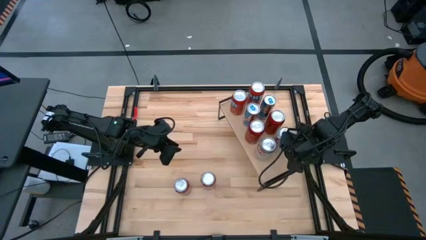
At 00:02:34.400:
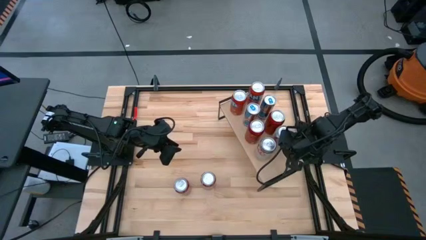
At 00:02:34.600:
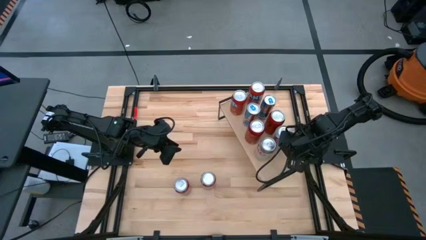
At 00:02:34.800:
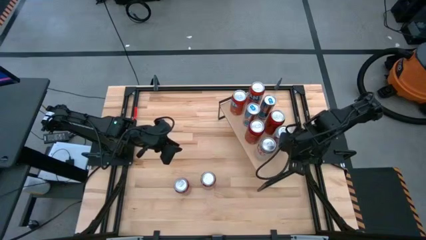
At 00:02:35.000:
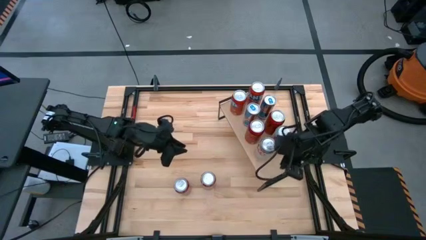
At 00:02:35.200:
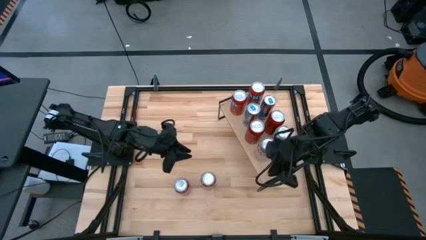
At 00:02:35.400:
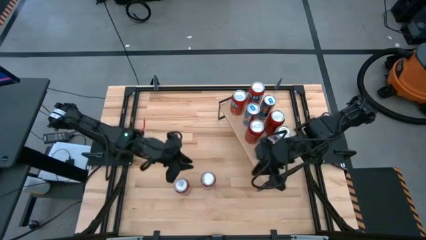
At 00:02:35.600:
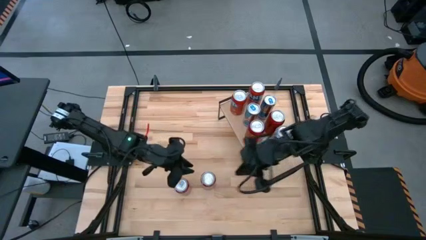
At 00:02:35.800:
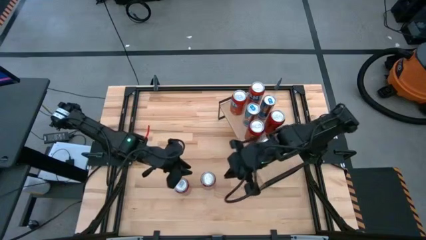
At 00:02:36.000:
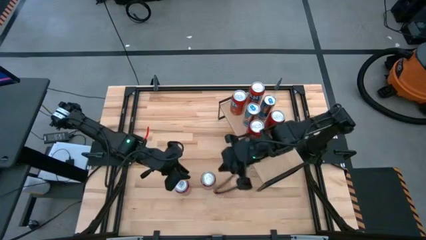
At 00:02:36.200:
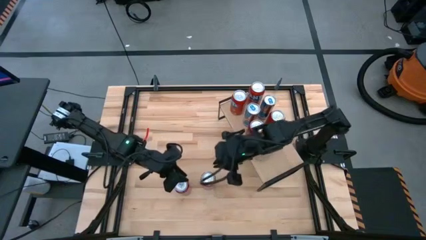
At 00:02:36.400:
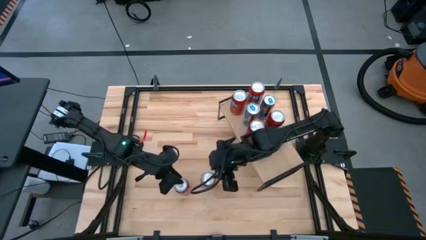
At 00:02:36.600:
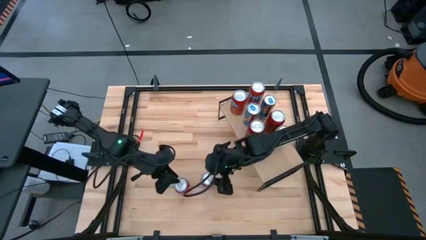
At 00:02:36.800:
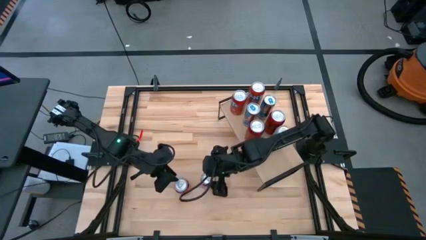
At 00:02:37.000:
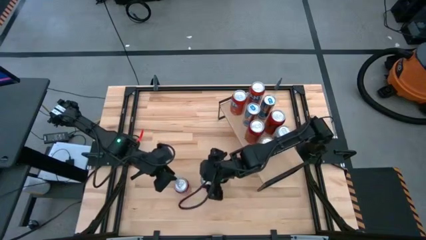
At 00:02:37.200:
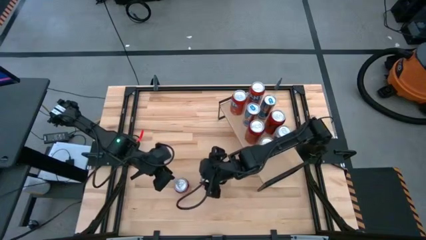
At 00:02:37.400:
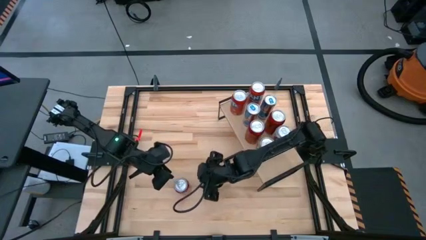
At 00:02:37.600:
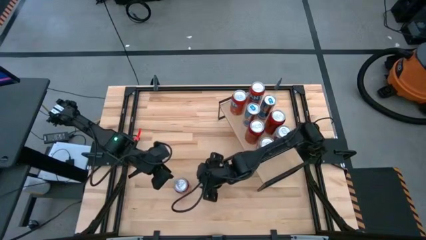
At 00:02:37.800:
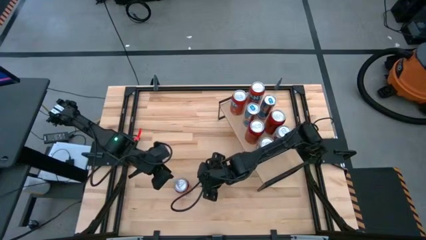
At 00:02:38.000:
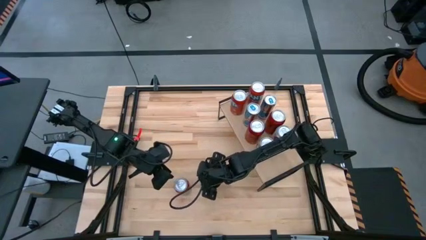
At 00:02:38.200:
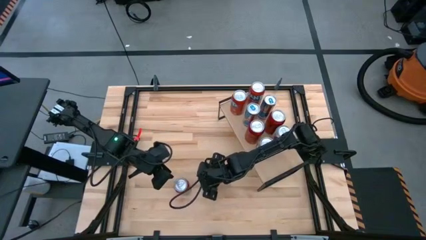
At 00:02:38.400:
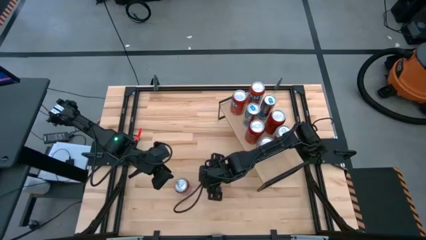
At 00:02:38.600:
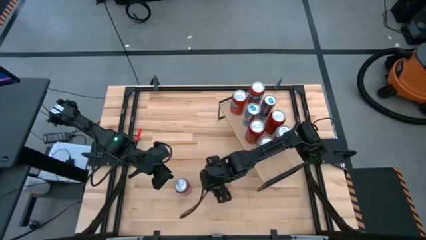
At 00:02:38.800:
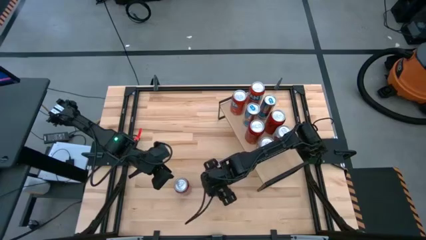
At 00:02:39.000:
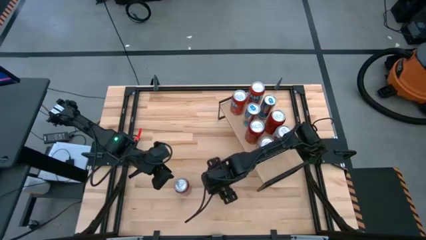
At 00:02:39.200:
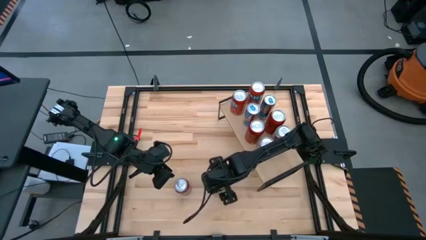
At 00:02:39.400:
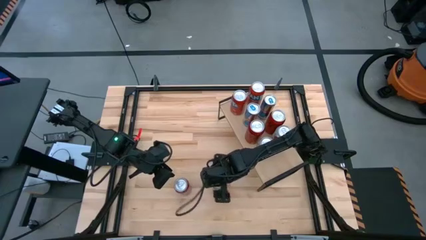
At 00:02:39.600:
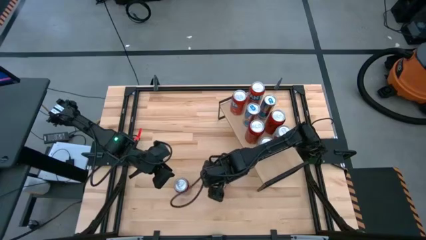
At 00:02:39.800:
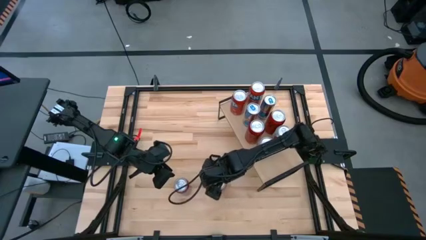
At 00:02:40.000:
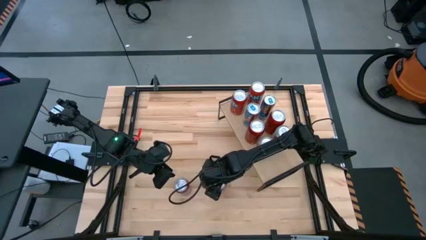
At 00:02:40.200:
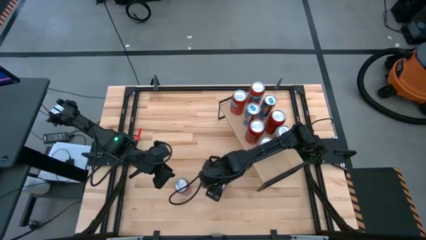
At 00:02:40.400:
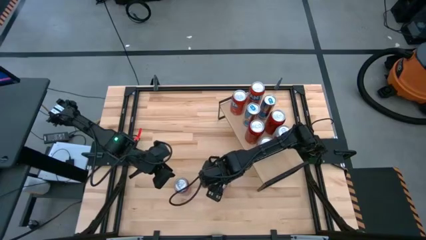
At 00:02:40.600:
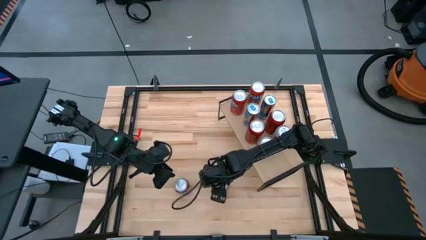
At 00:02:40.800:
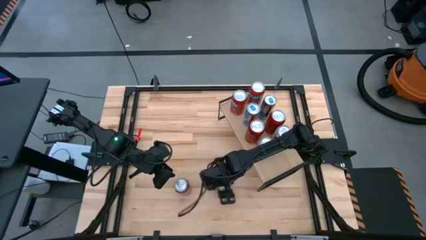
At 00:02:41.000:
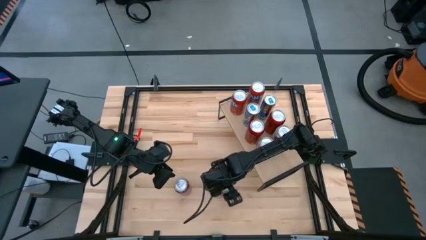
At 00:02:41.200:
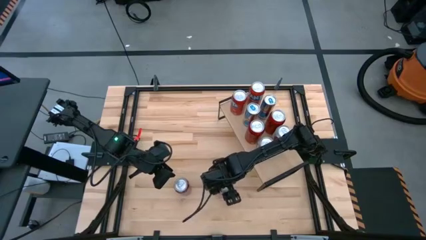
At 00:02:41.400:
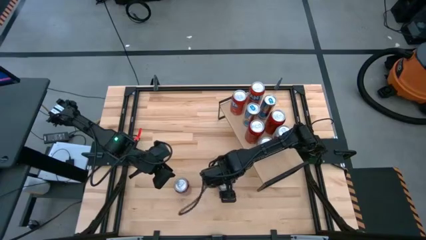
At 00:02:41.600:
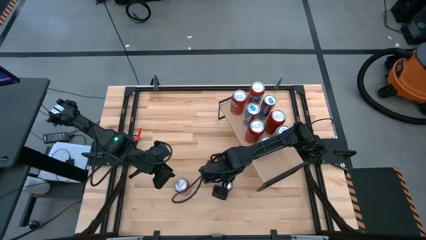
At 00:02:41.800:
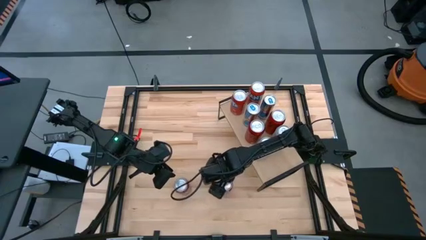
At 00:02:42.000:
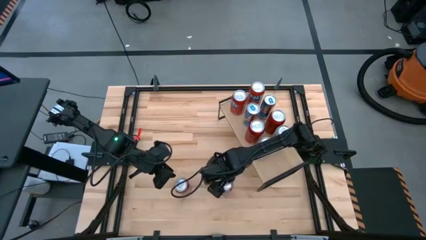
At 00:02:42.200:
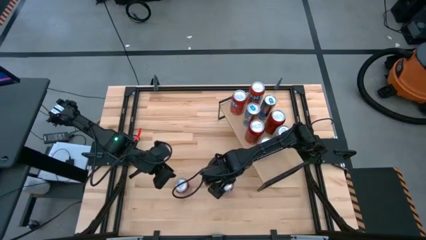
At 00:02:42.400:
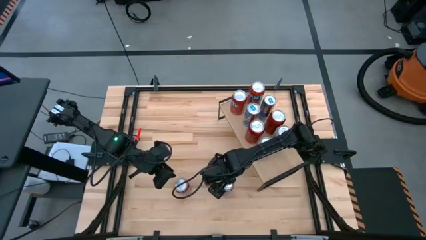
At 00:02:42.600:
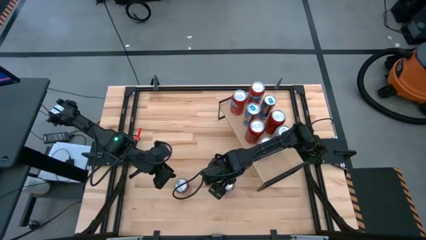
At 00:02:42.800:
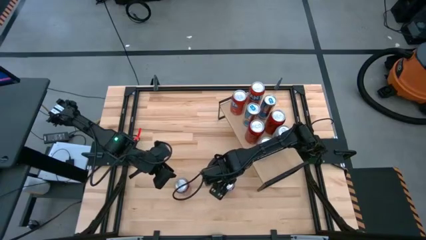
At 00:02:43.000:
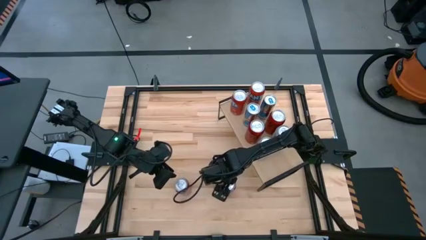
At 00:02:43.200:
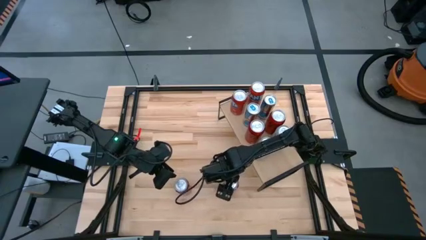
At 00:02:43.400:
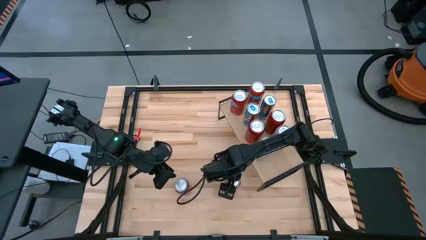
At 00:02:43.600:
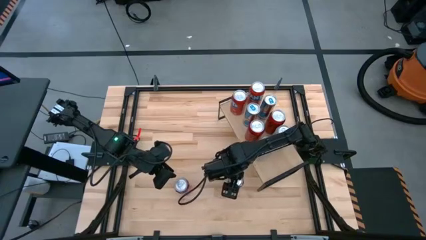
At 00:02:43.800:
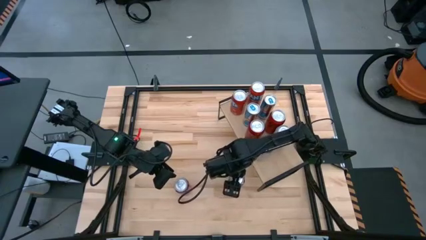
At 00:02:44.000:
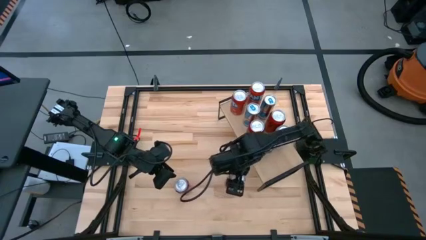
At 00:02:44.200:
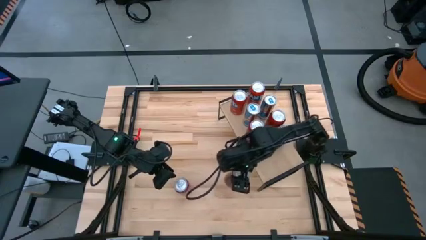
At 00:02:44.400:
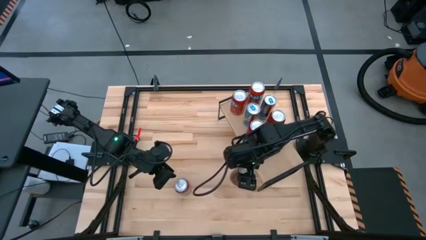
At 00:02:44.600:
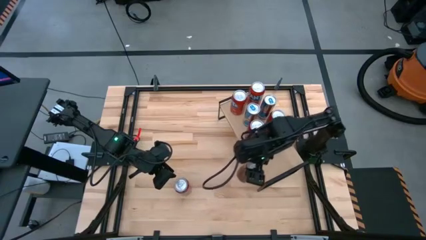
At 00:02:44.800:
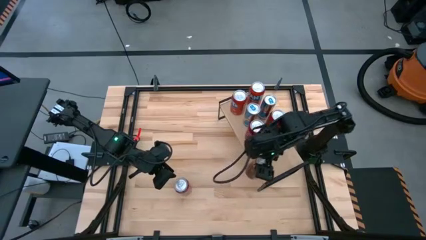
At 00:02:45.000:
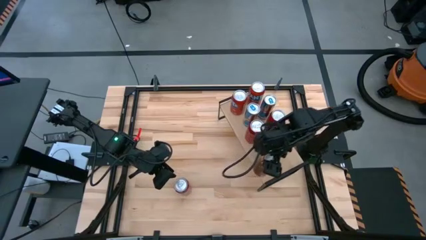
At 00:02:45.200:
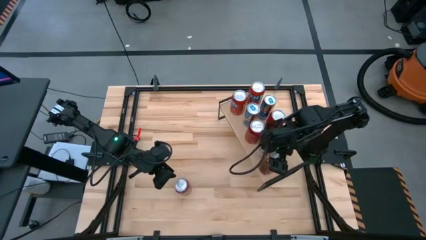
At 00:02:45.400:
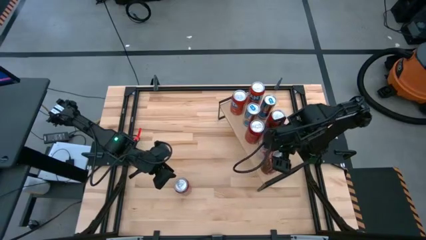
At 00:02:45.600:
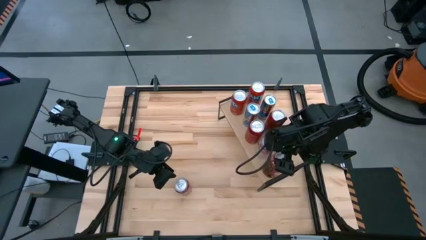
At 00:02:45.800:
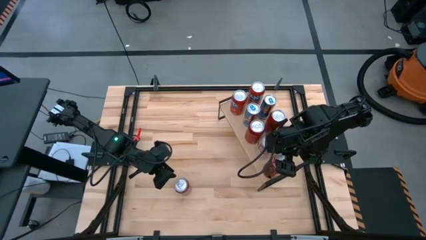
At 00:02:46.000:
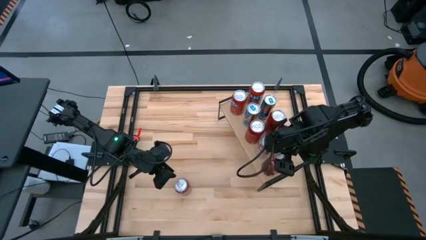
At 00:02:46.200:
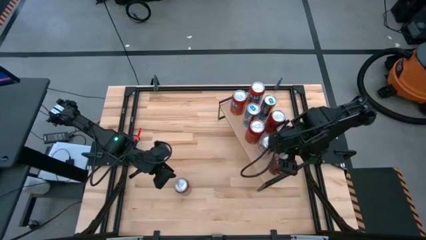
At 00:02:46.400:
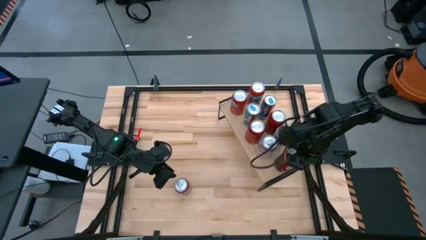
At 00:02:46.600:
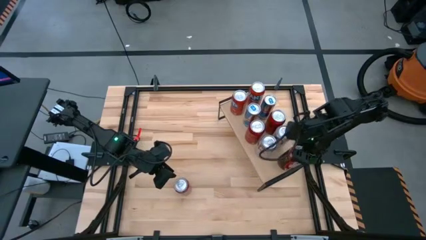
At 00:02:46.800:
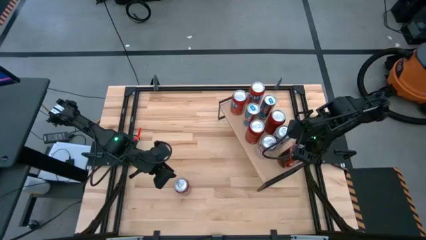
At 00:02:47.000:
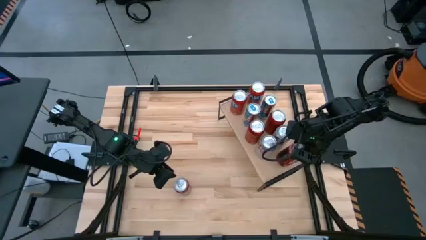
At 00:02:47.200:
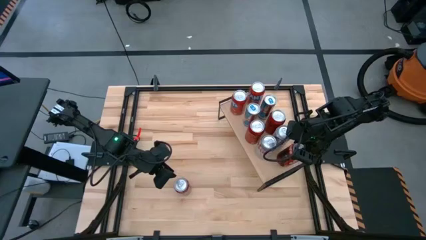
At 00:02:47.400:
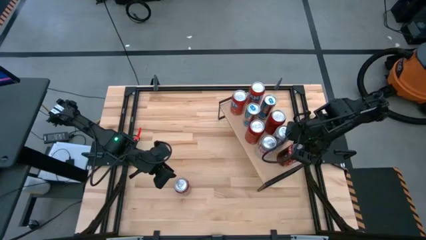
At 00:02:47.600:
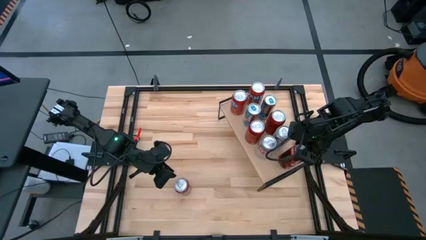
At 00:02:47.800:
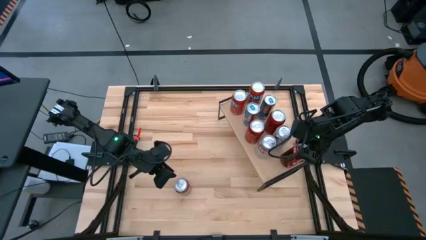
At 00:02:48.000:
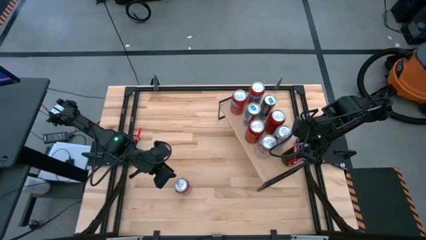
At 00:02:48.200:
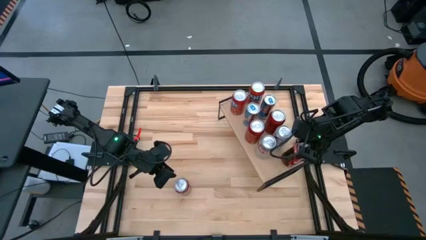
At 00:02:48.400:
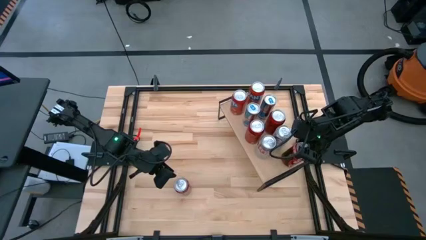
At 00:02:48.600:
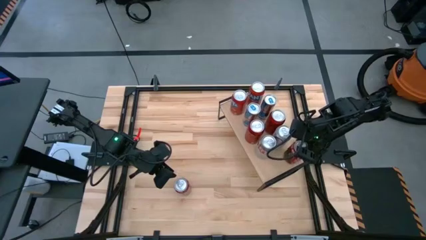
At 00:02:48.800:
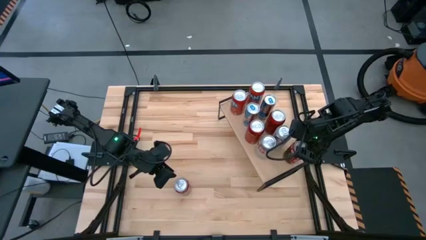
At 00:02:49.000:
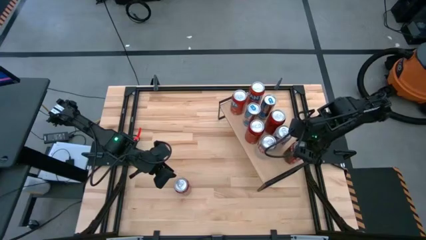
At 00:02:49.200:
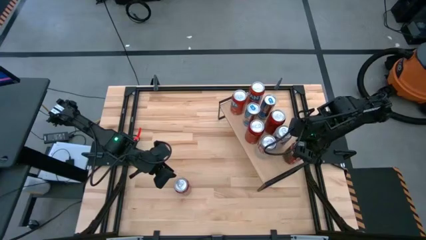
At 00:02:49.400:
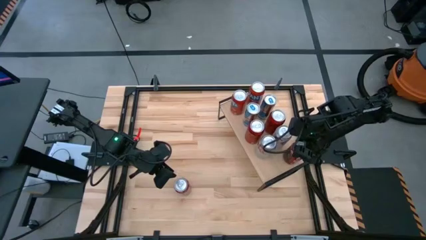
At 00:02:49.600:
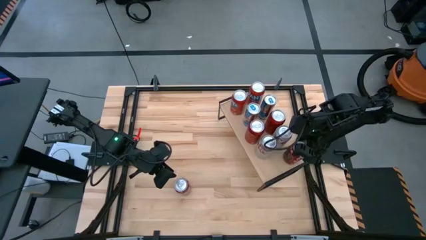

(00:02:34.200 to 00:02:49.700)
Task: Place canned beverage on shelf
Put the right red soda can on the shelf
